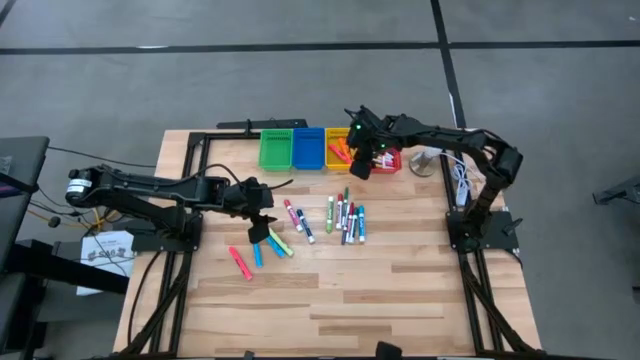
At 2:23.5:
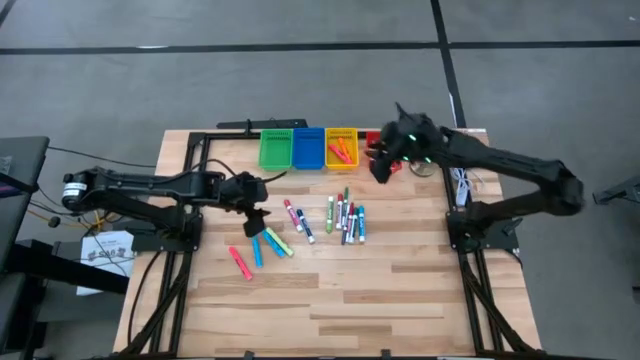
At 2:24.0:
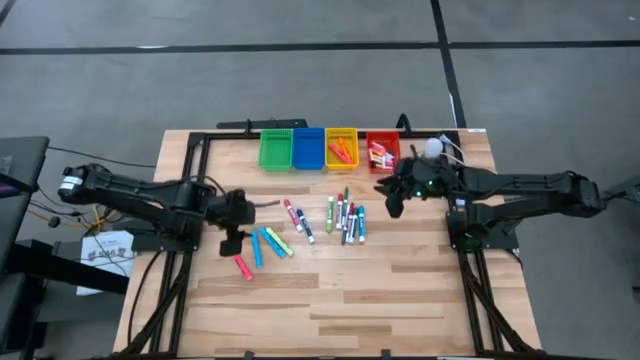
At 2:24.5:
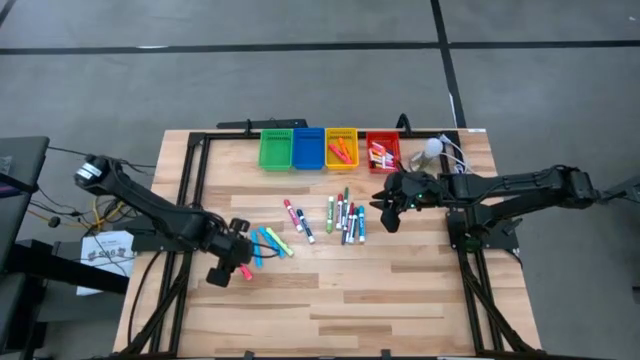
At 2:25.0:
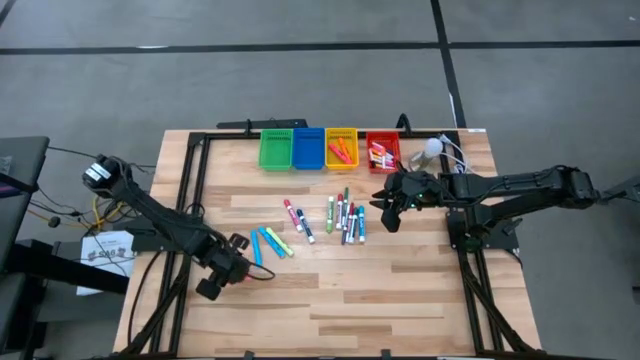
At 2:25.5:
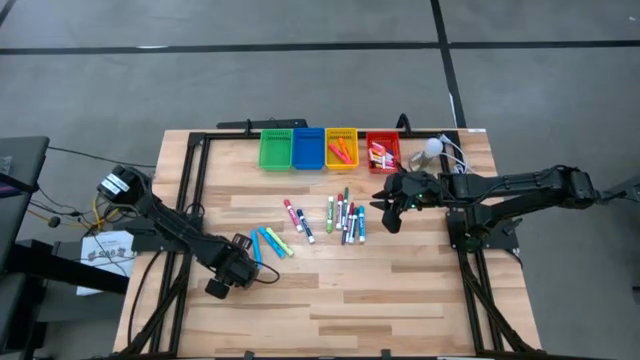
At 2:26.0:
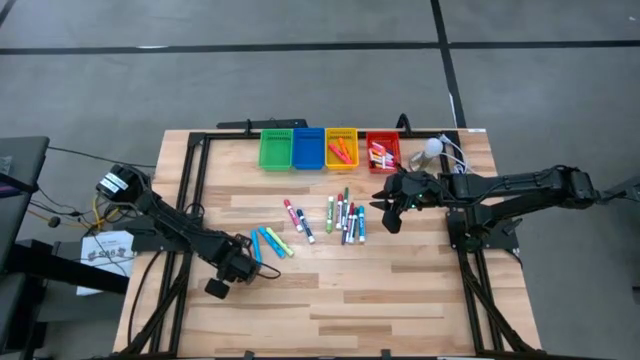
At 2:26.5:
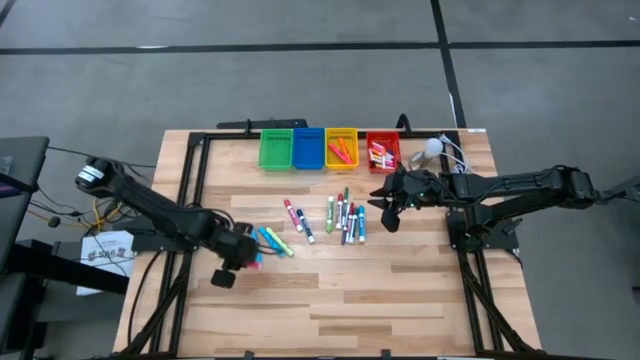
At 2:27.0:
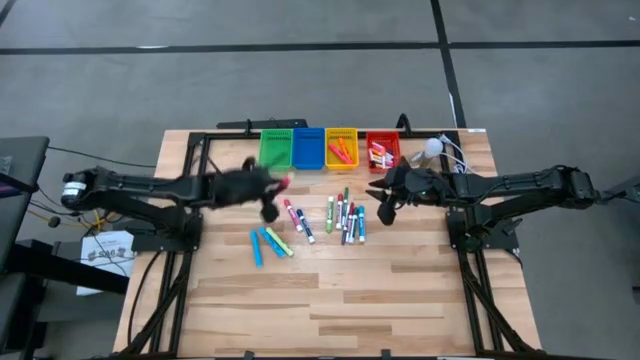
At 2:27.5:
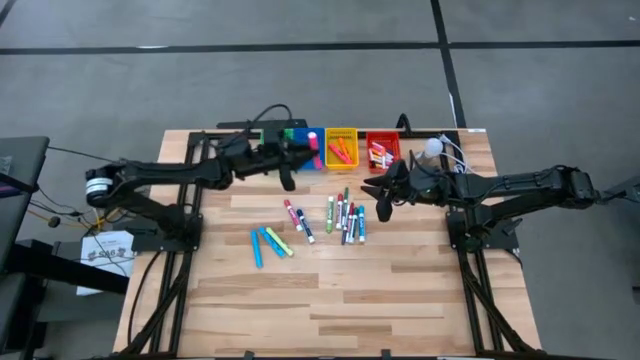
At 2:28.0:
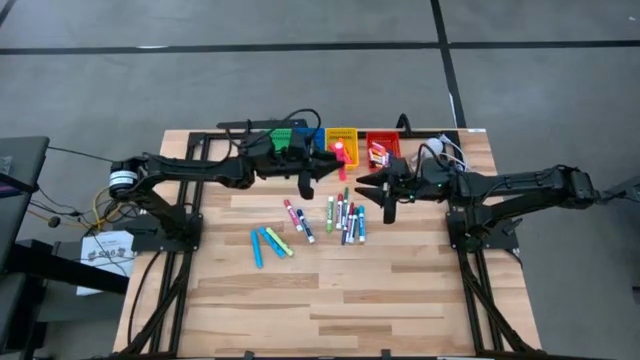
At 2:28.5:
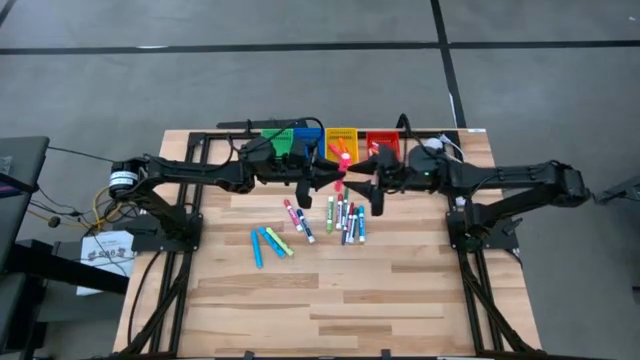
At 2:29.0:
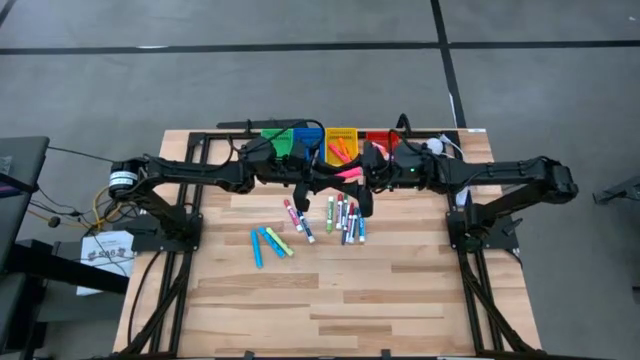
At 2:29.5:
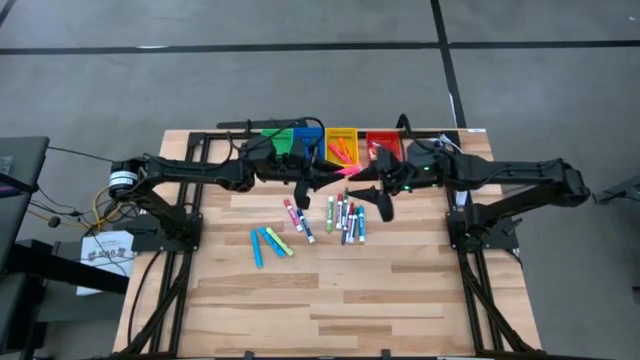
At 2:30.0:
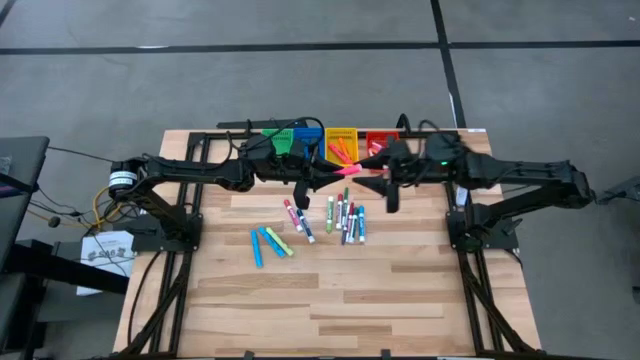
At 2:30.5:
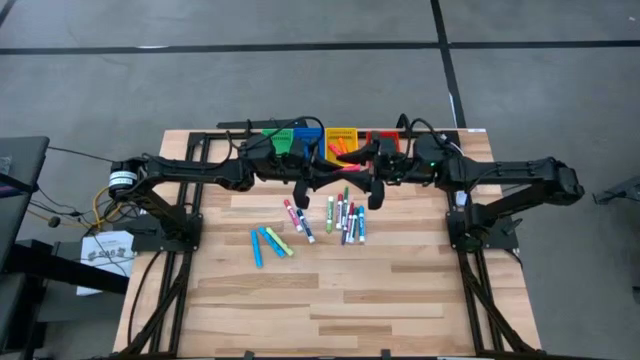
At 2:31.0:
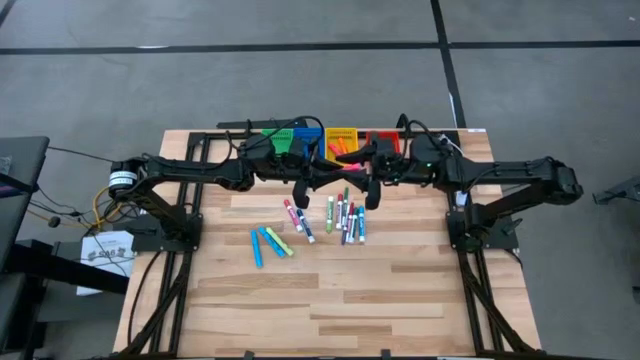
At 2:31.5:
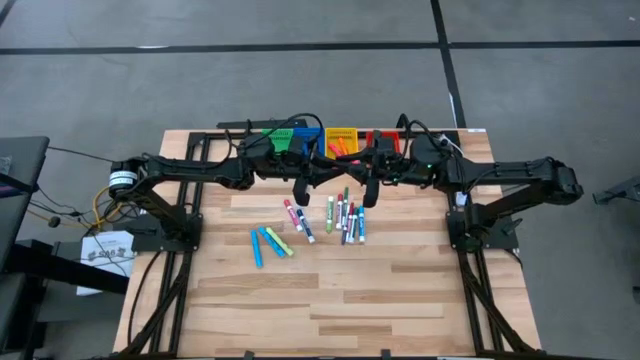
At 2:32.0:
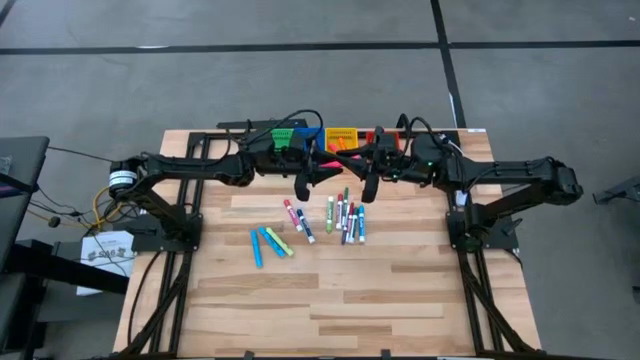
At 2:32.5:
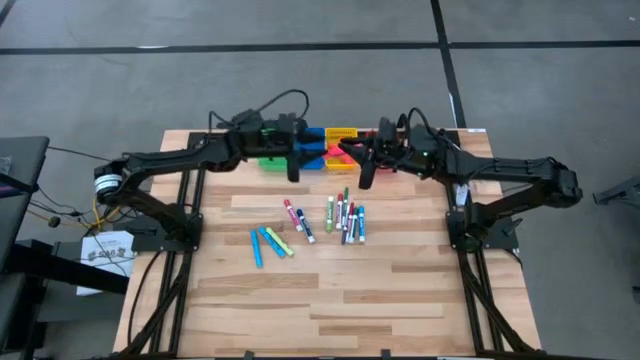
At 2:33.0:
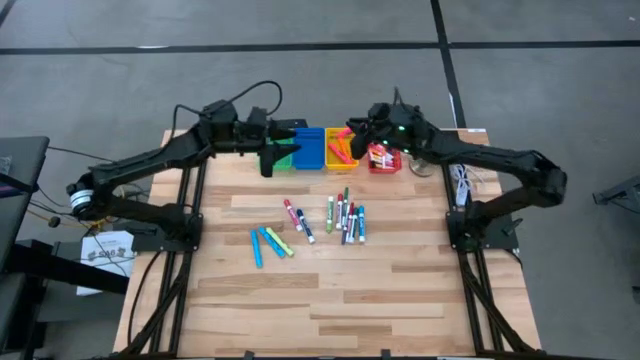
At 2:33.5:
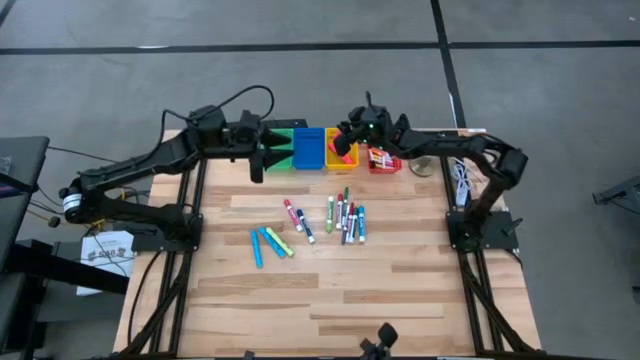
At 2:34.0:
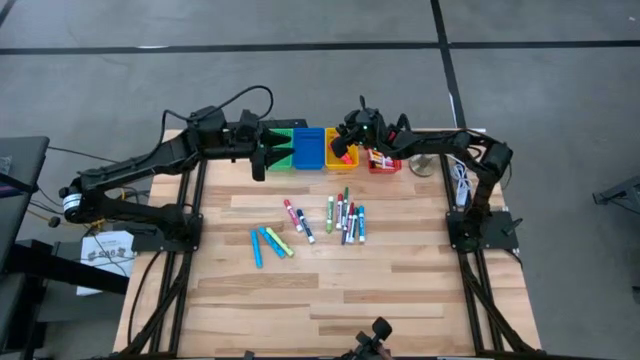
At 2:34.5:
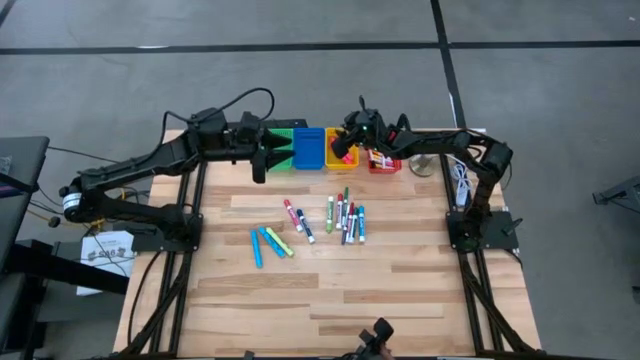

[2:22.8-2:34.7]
Task: Pick & Place Markers
Put the pink highlighter into the yellow basket

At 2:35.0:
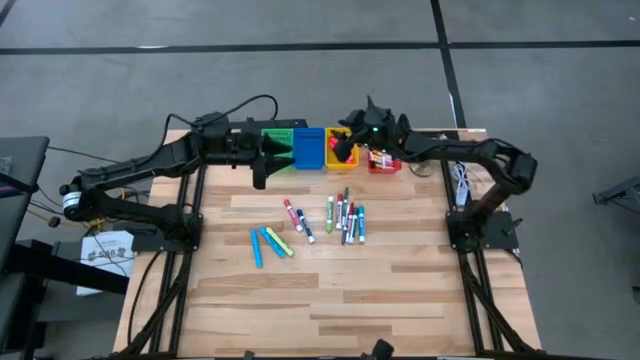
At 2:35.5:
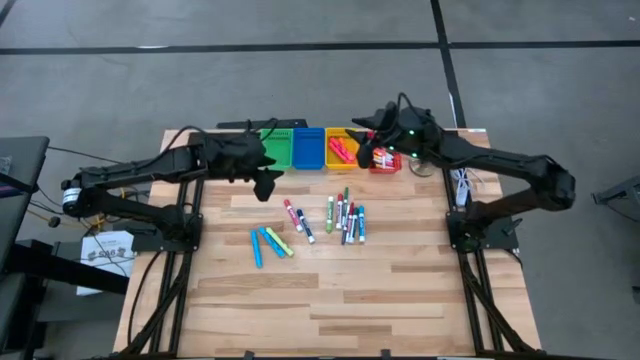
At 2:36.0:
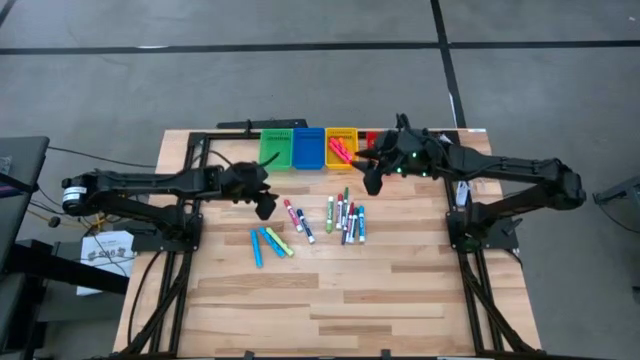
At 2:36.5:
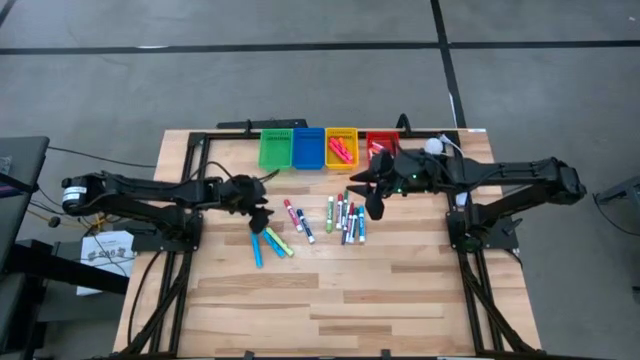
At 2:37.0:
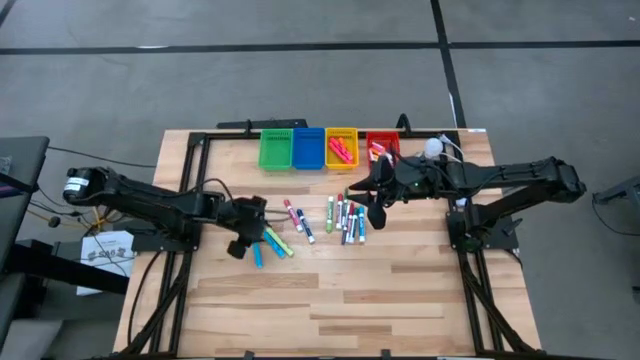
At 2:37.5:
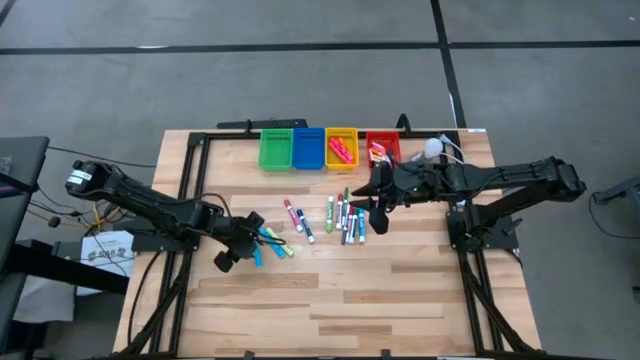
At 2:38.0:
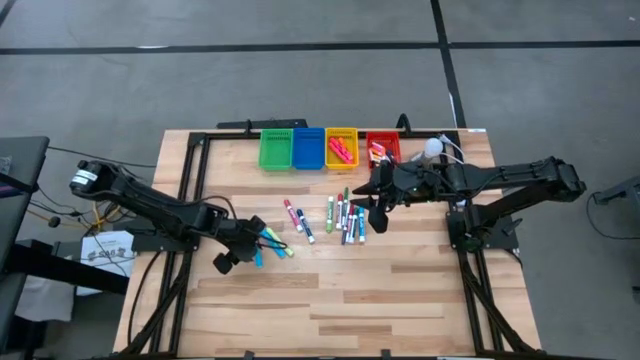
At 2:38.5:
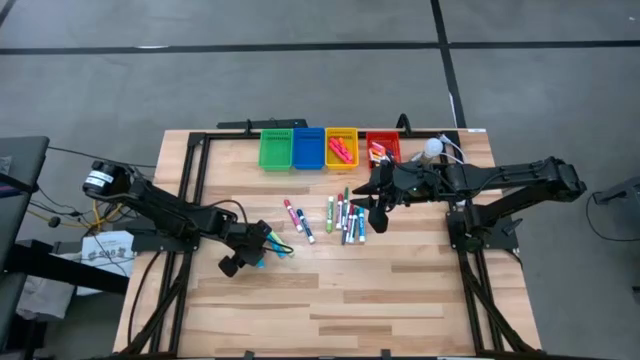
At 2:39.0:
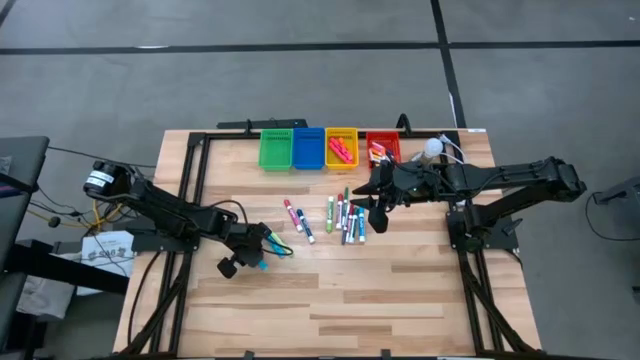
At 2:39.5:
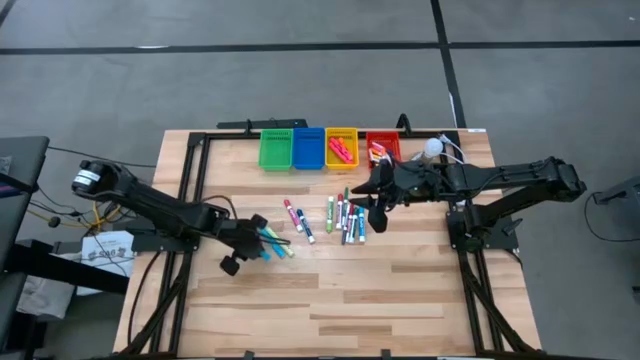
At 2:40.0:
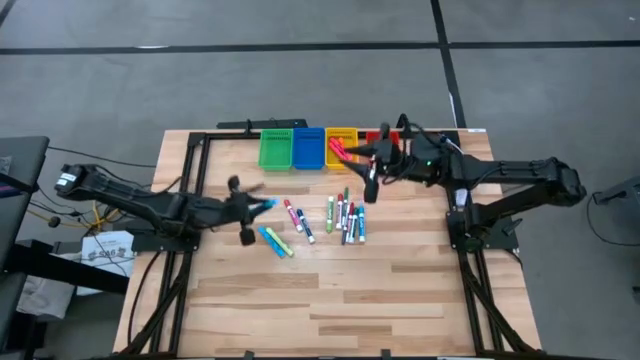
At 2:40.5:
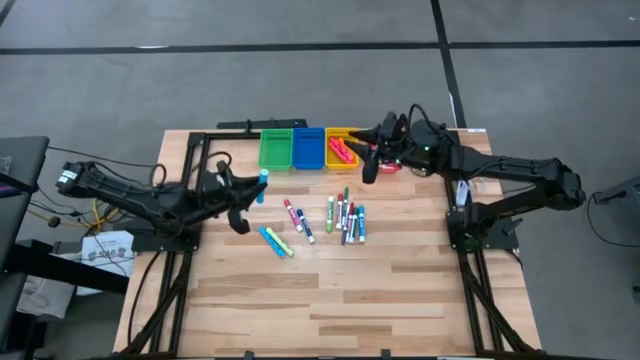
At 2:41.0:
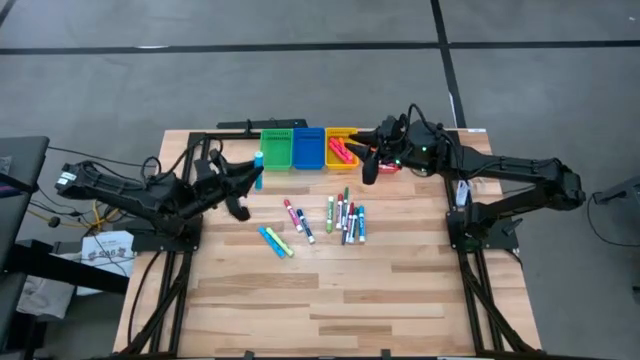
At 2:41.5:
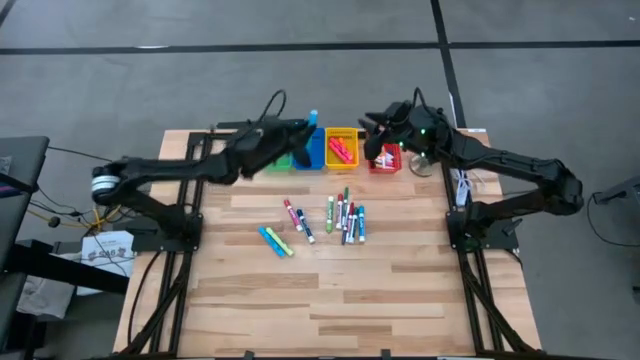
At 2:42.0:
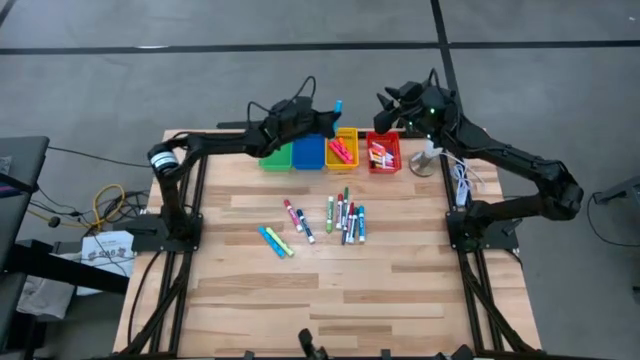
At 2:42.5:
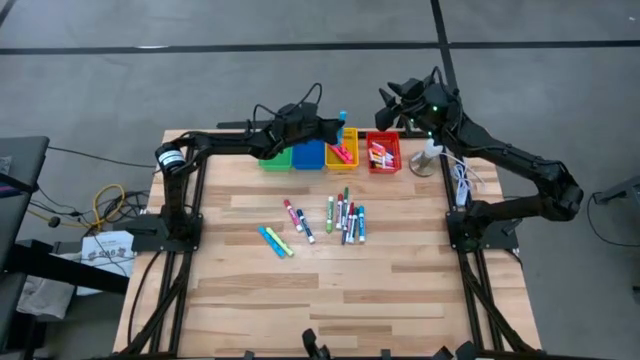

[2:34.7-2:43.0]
Put the left blue highlighter into the yellow basket

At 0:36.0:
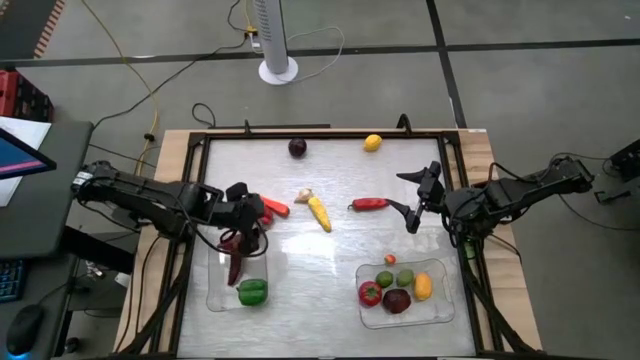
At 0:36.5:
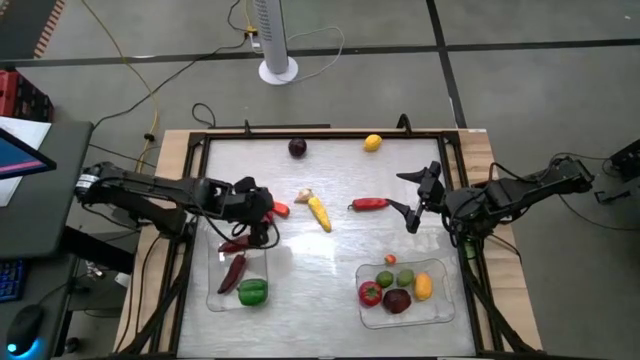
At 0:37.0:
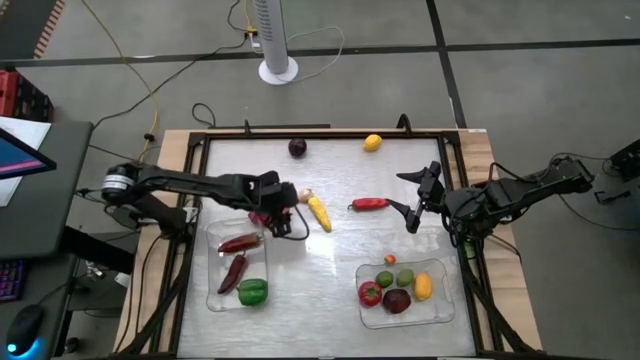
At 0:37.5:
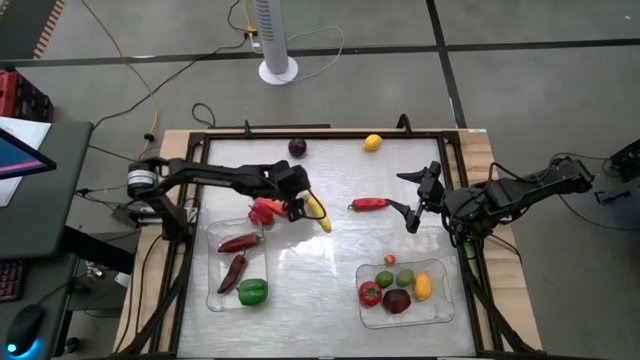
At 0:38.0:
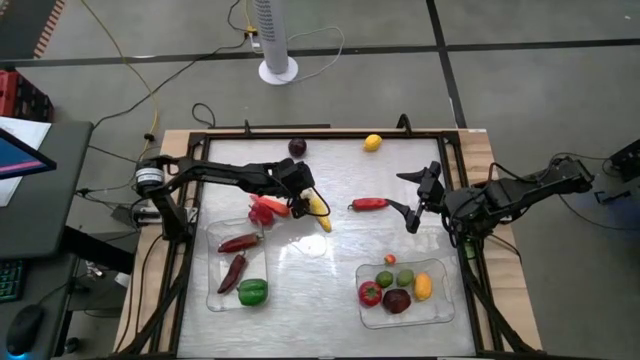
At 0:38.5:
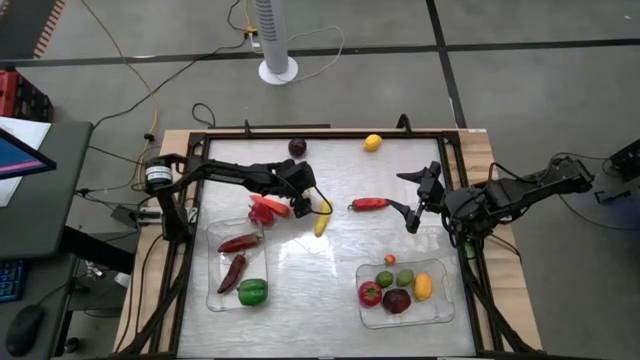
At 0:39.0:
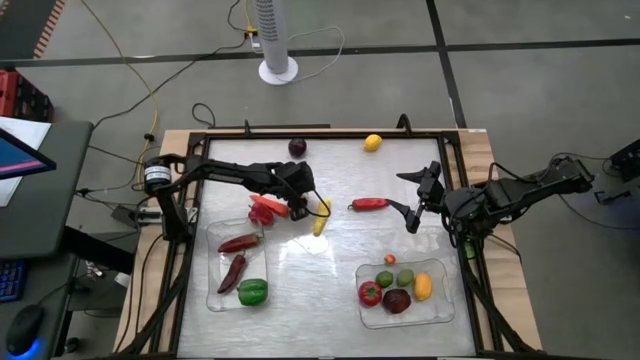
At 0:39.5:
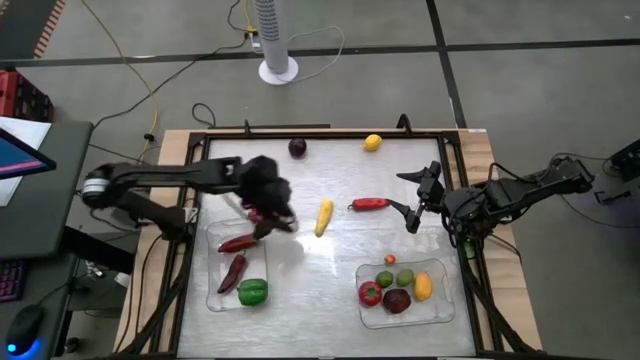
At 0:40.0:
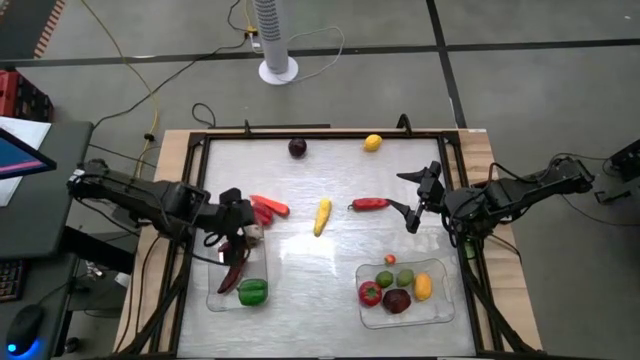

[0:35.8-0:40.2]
Task: Sort produce into baskets
Put the garlic into the left transparent bin
